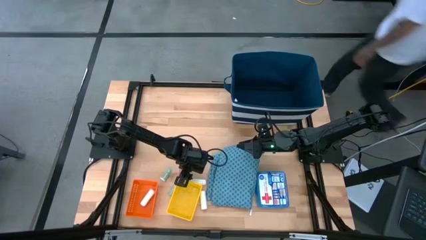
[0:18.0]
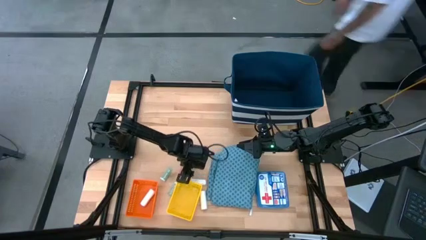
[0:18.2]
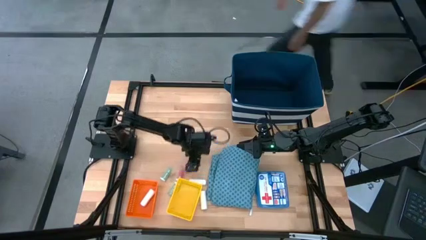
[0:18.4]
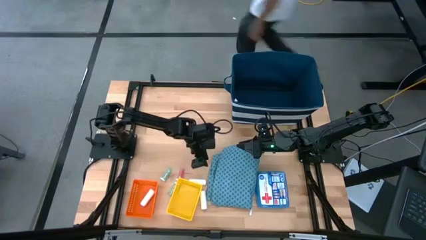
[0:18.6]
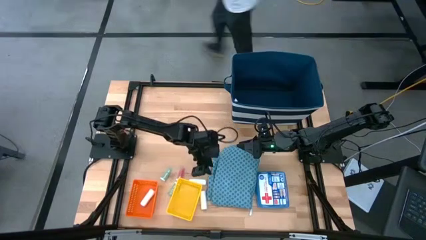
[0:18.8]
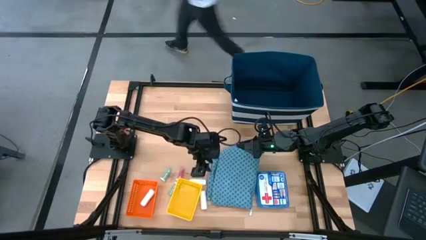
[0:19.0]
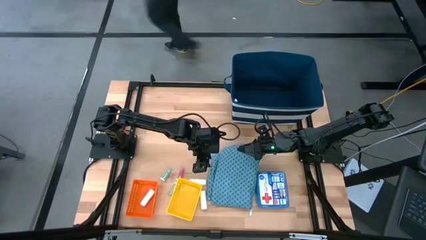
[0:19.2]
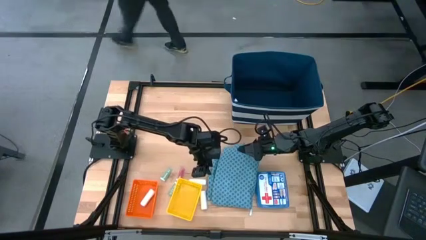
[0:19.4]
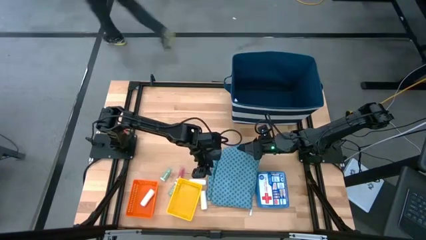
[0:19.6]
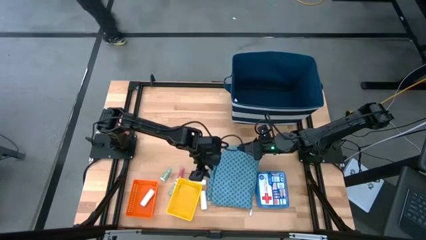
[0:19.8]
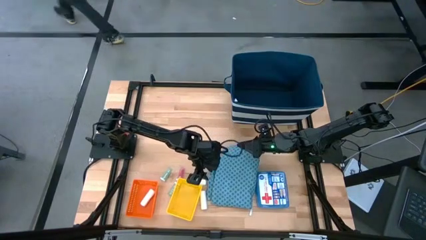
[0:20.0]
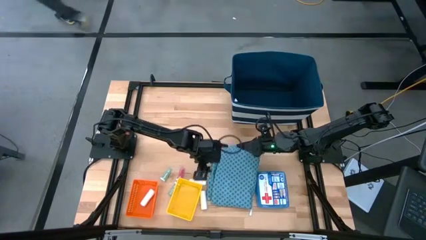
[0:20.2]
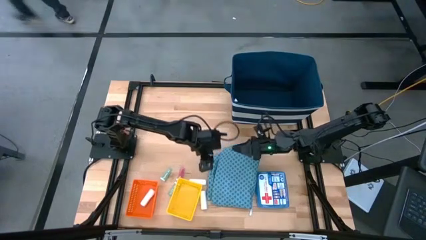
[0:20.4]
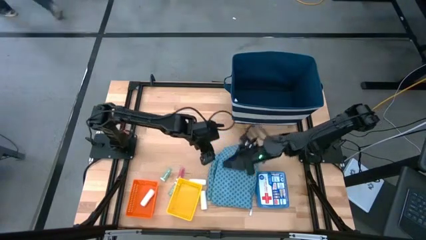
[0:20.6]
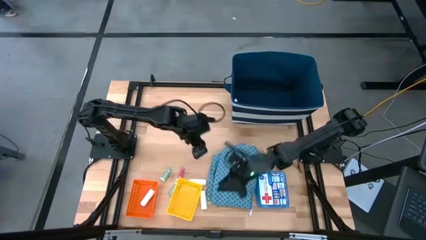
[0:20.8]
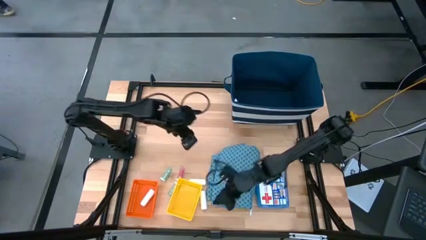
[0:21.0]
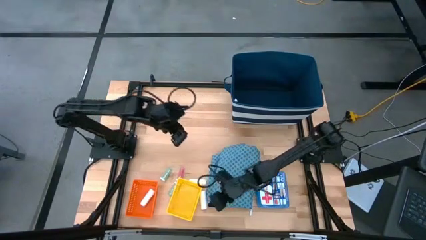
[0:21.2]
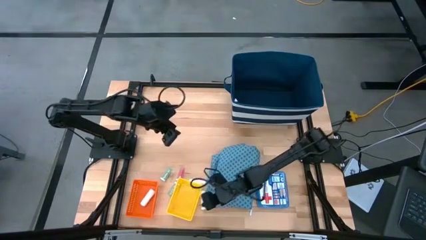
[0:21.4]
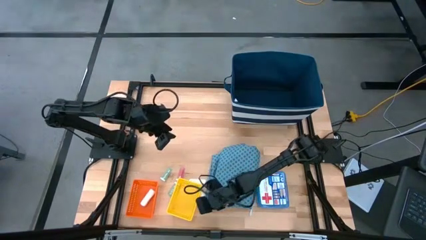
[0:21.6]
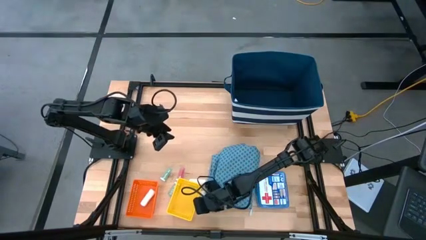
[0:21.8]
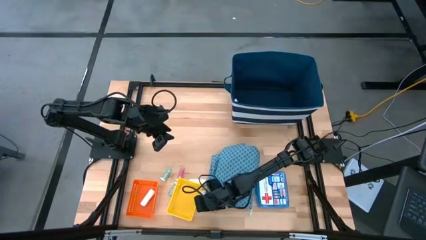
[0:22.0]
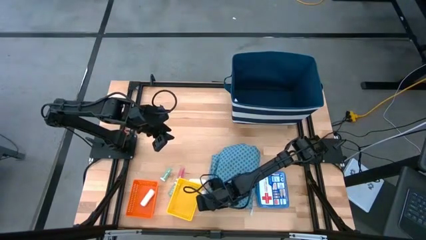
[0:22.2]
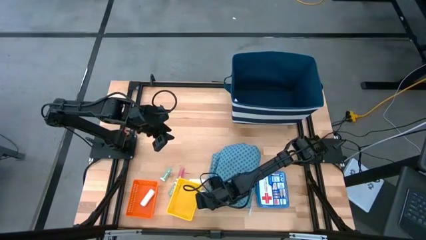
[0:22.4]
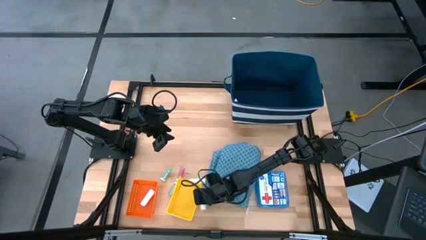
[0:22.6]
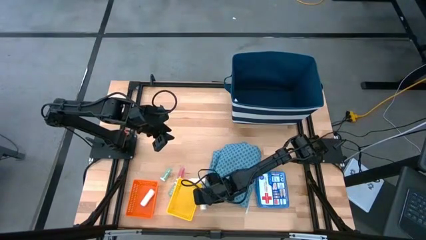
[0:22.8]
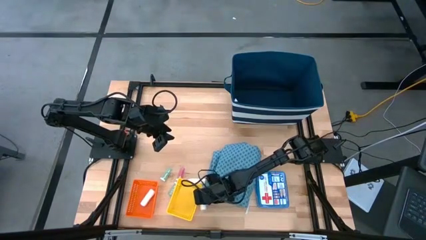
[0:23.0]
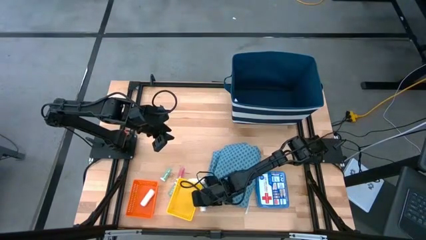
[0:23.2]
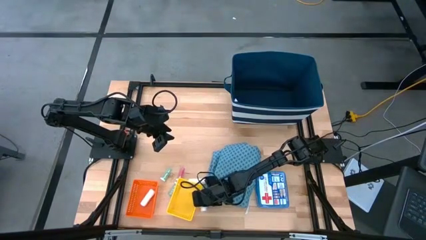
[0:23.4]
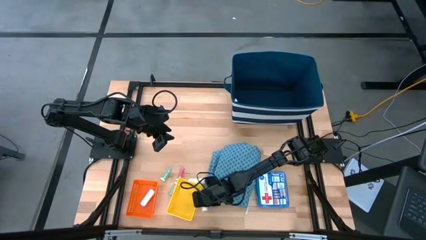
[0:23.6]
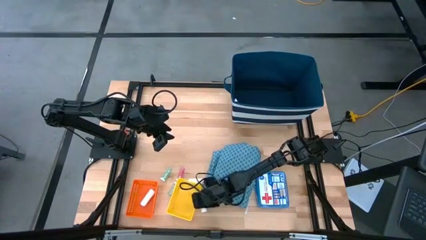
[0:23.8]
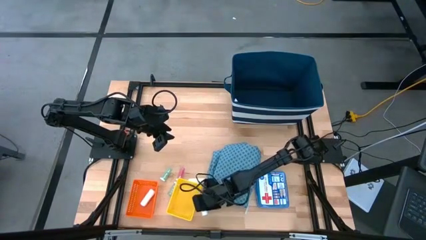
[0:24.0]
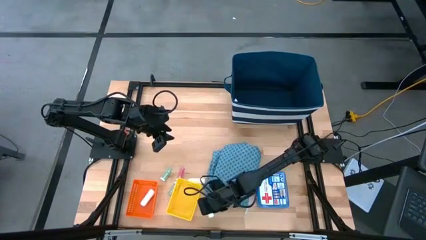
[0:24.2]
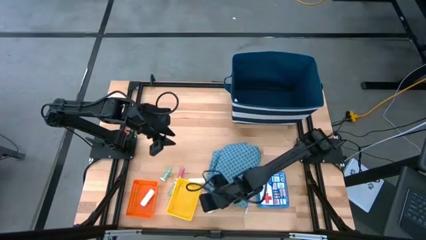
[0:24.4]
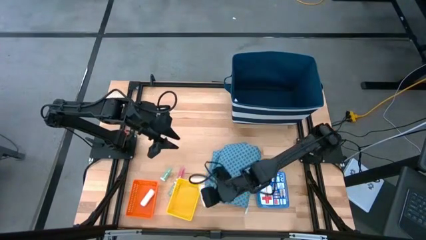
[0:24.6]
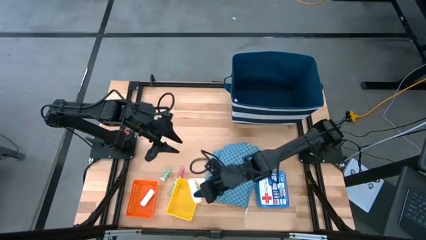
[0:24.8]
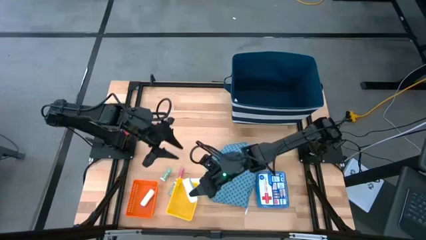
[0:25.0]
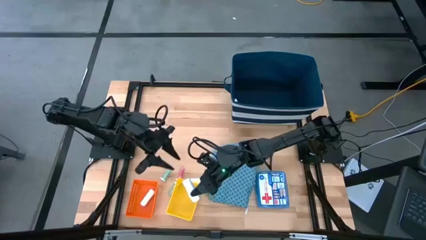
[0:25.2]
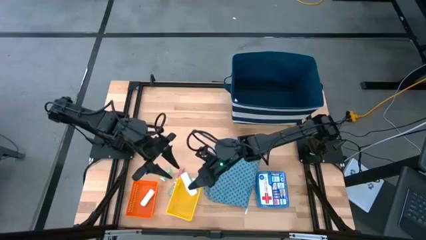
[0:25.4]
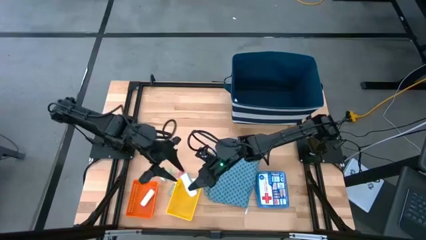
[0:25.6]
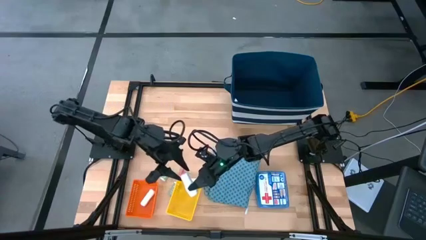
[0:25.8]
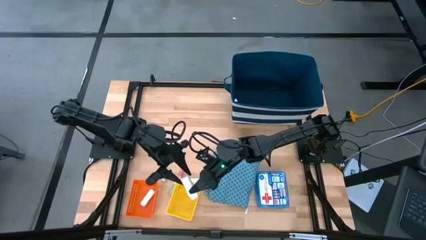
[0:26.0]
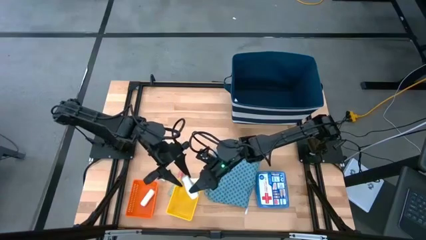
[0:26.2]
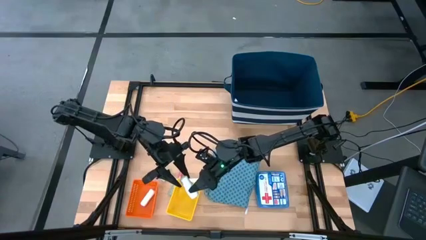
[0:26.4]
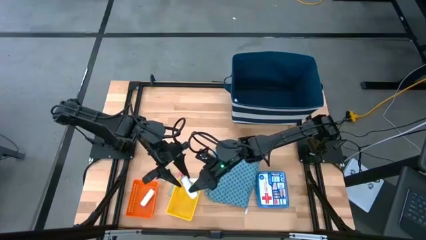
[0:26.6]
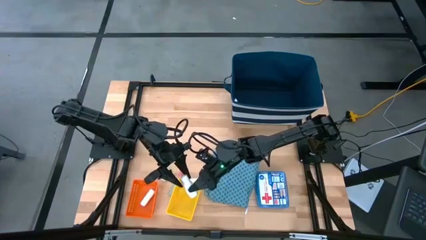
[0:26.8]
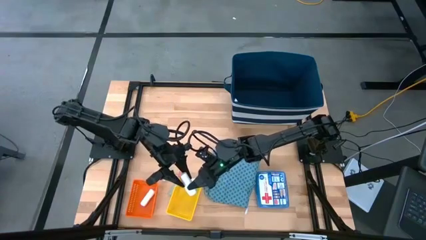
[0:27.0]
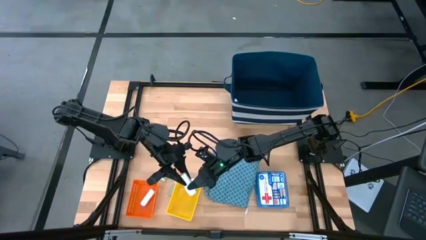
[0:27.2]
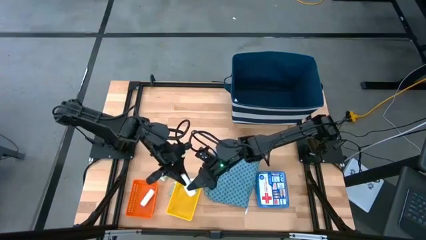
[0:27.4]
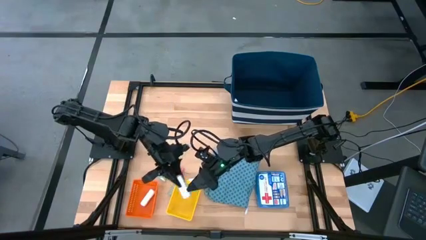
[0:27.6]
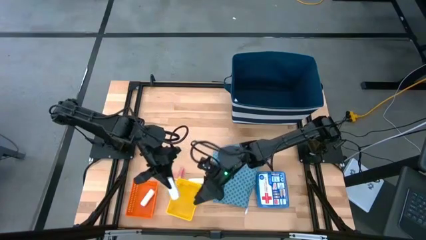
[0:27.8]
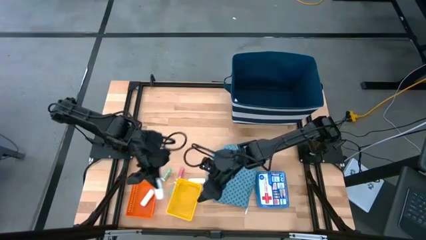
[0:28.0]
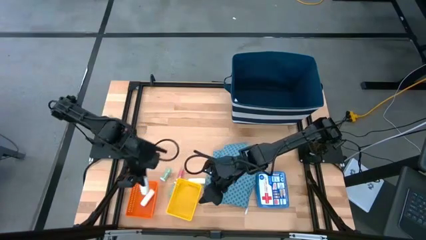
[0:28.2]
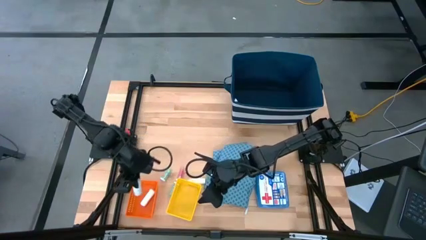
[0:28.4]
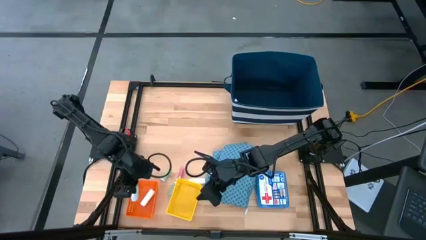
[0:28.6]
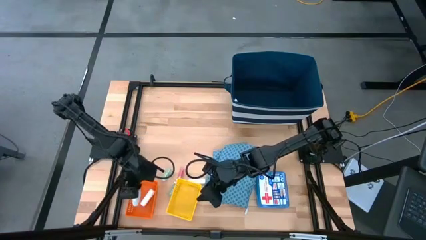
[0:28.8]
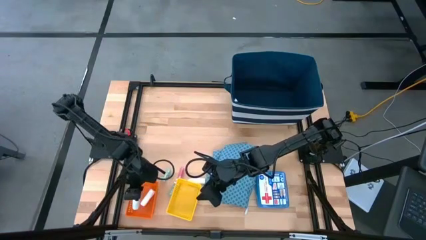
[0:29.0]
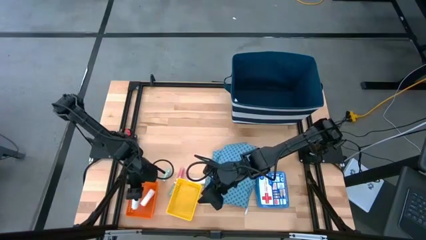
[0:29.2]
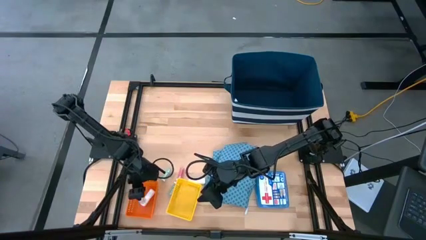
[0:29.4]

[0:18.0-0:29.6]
Task: Pick & Place Medicine items
Put the bottom white rolled gauze into the orange bin

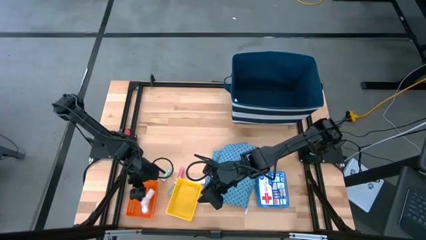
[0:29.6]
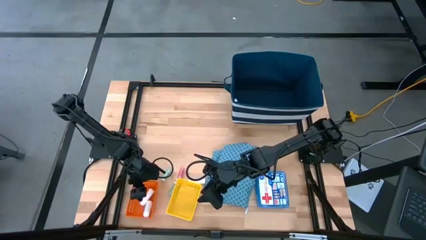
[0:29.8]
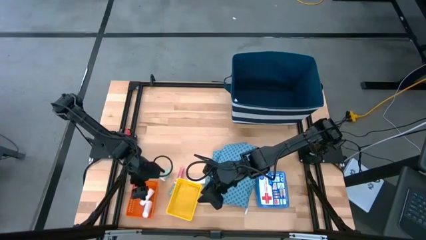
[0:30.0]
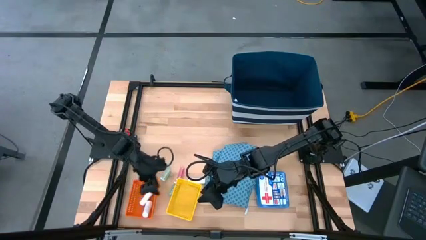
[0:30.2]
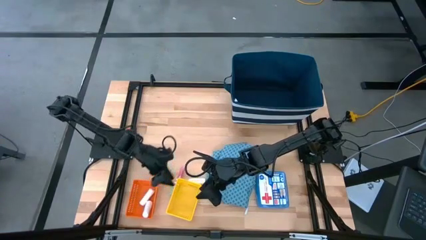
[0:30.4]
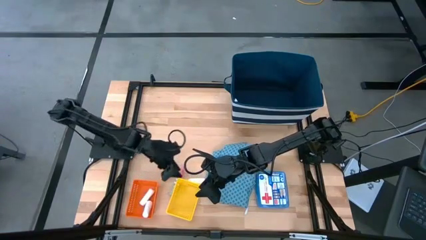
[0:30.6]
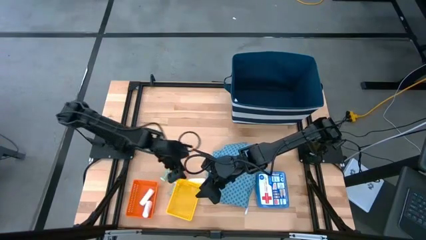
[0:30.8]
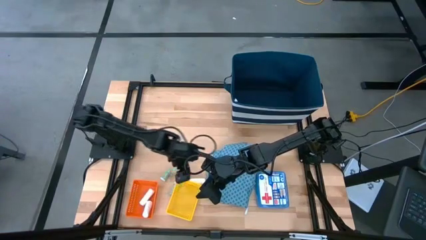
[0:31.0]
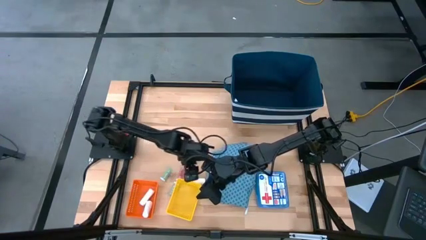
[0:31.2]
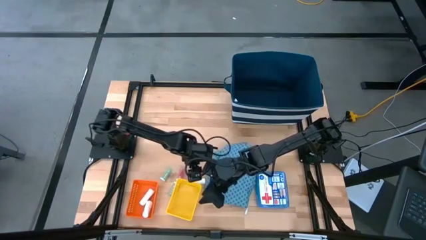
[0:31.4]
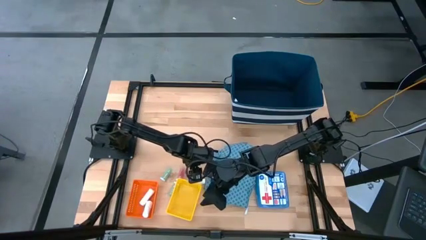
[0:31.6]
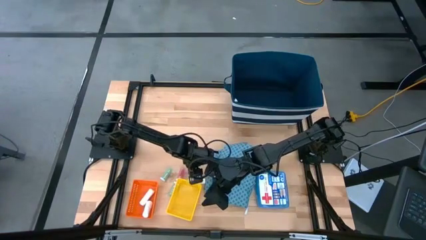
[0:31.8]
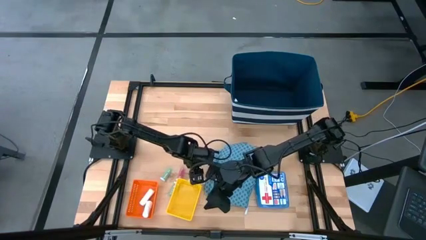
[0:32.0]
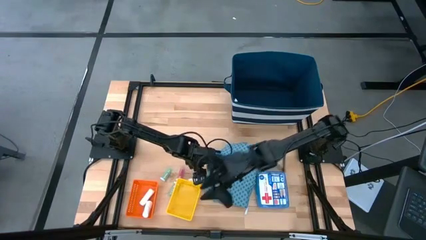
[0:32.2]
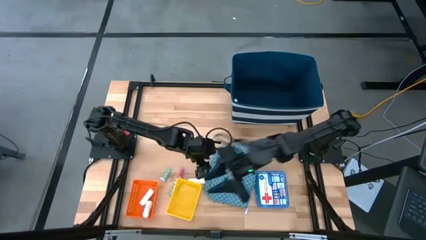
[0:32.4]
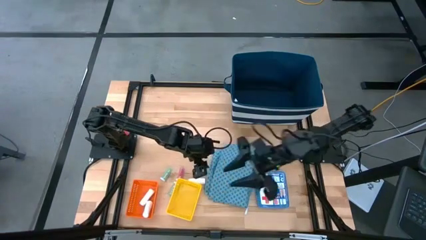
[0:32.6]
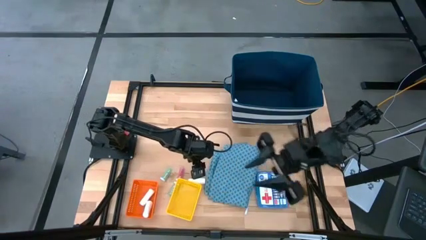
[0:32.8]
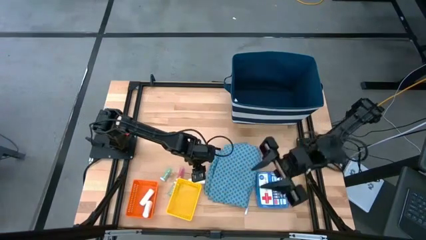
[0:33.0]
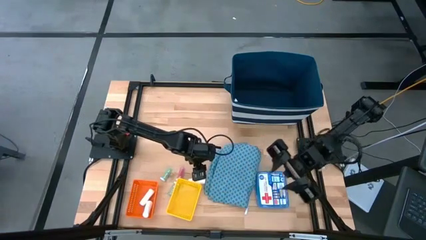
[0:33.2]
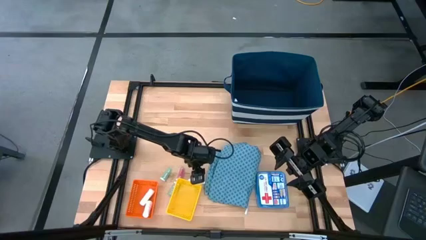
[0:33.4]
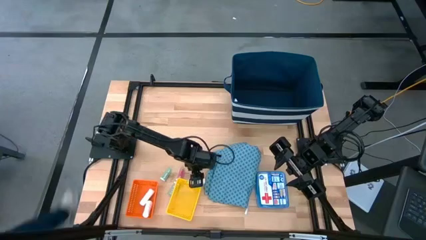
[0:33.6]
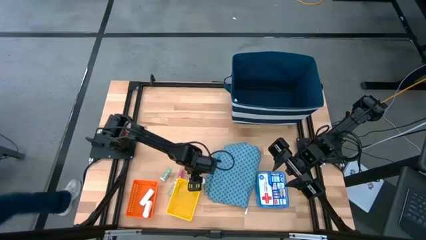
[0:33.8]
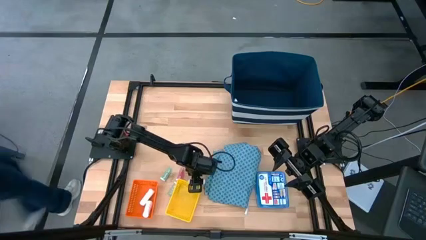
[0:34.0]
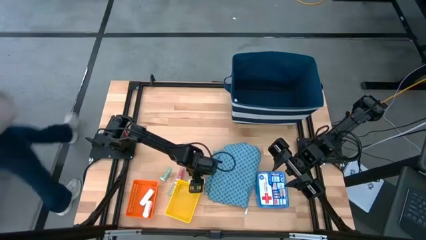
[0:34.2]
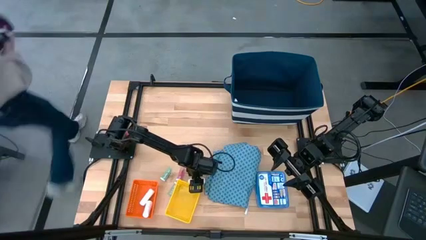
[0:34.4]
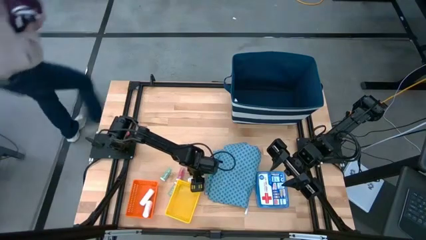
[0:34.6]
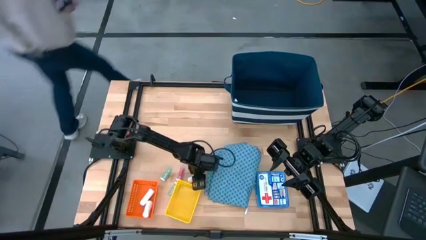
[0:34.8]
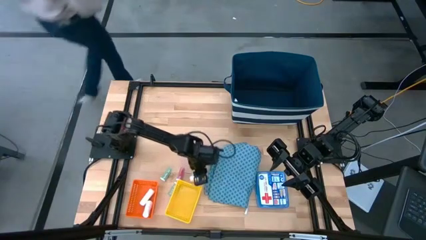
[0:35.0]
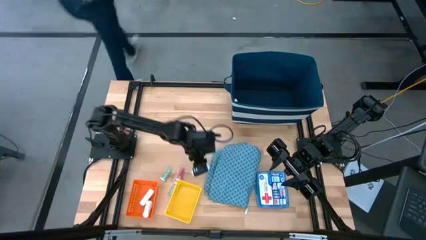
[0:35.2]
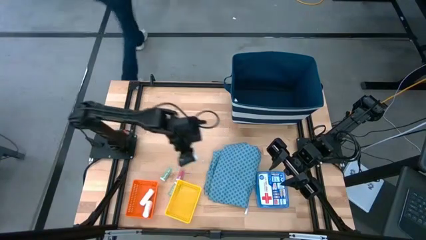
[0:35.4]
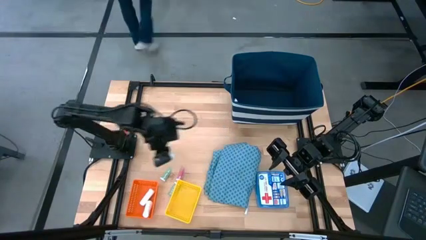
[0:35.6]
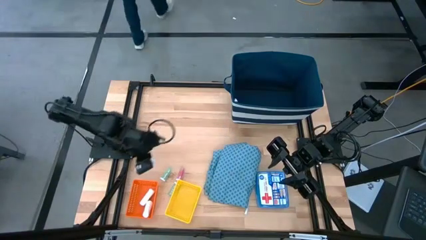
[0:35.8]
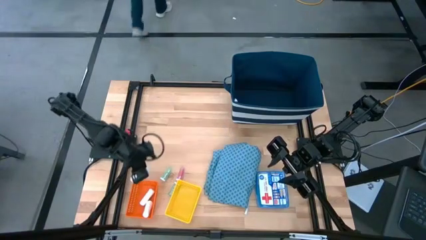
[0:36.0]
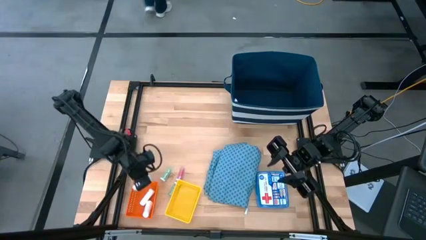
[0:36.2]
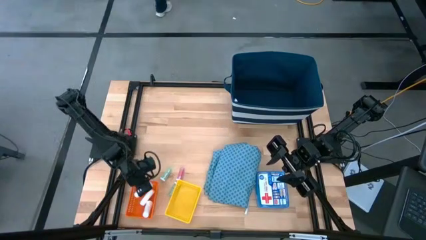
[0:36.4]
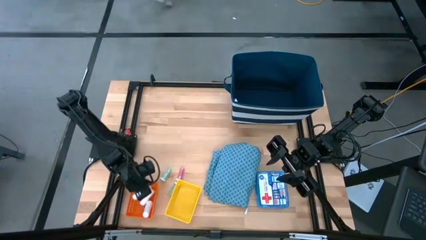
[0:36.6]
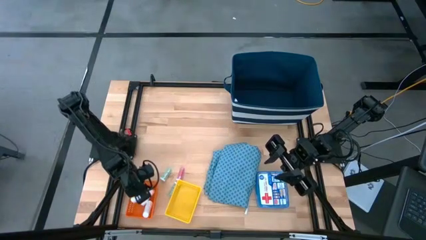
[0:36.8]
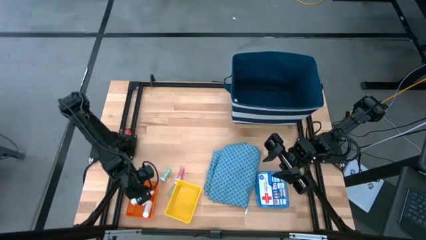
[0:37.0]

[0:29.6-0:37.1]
Put the white rolled gauze into the orange bin
